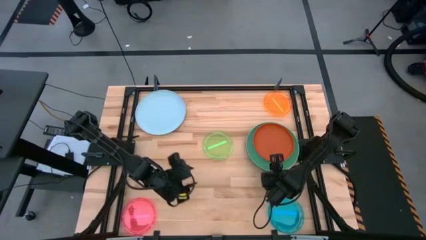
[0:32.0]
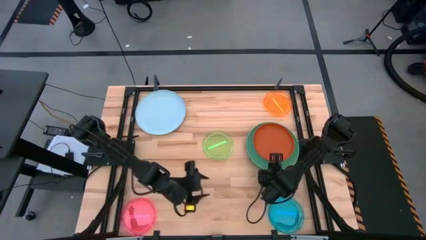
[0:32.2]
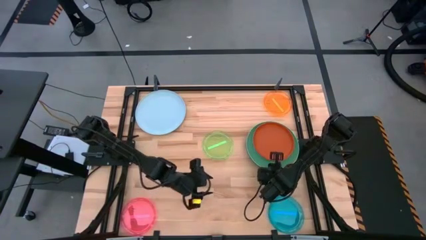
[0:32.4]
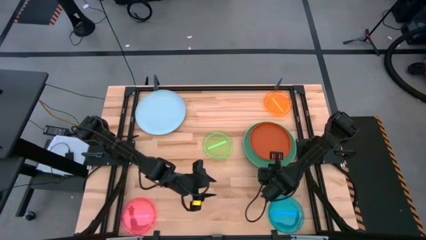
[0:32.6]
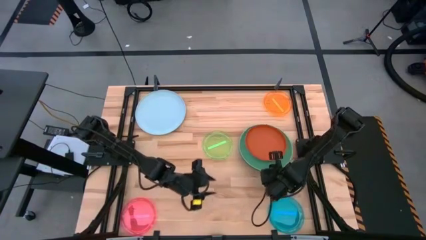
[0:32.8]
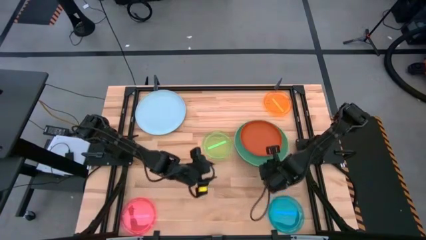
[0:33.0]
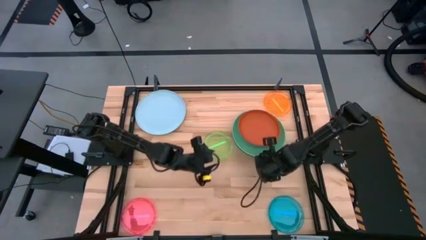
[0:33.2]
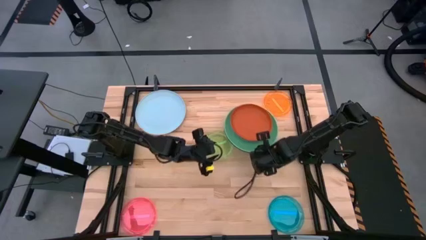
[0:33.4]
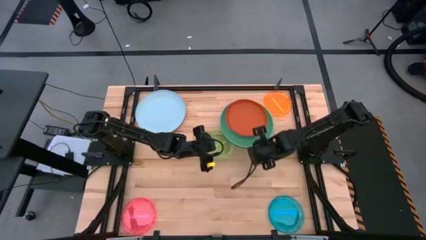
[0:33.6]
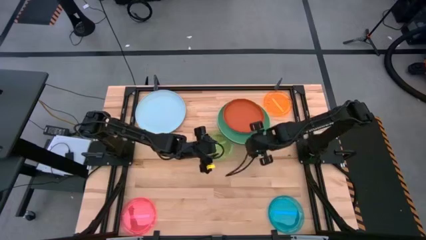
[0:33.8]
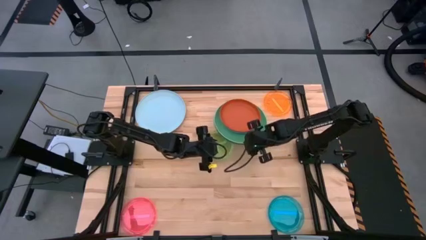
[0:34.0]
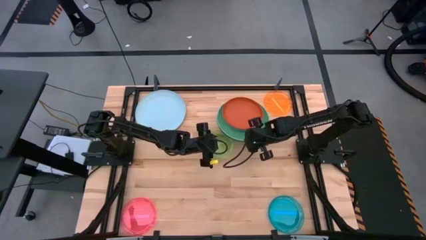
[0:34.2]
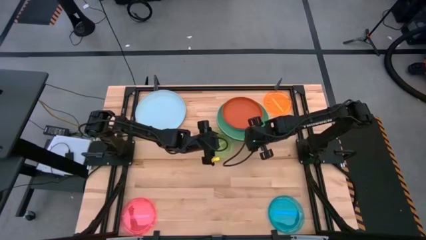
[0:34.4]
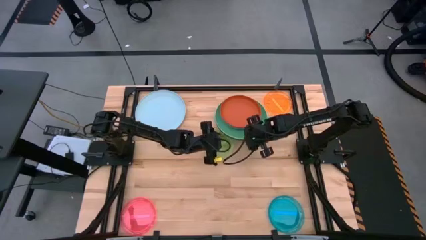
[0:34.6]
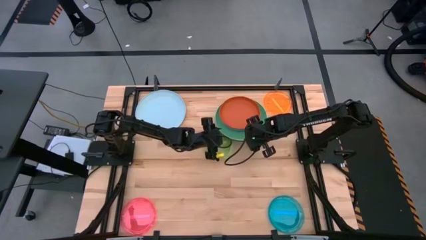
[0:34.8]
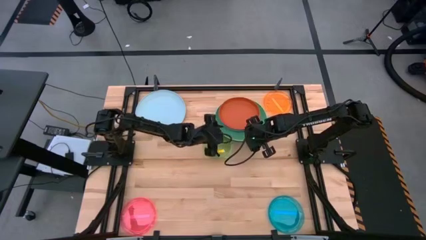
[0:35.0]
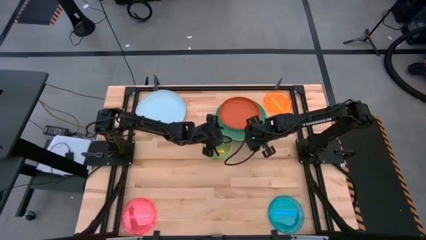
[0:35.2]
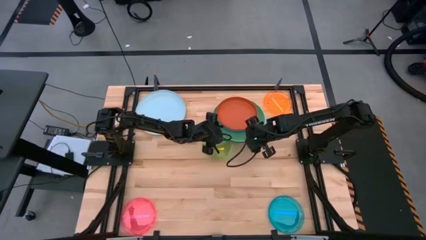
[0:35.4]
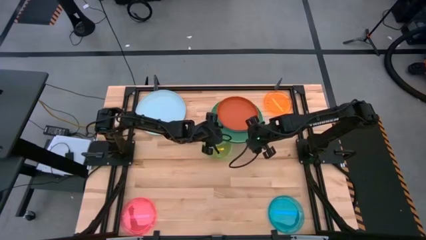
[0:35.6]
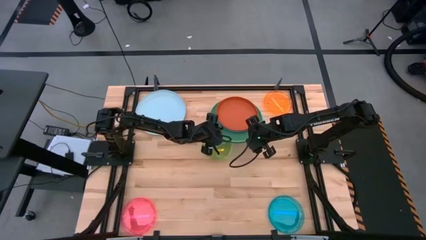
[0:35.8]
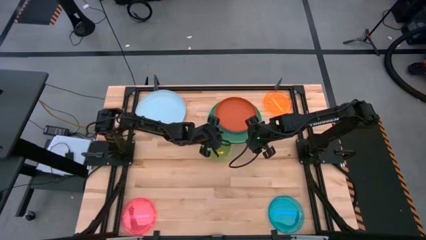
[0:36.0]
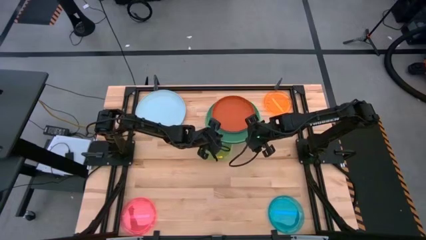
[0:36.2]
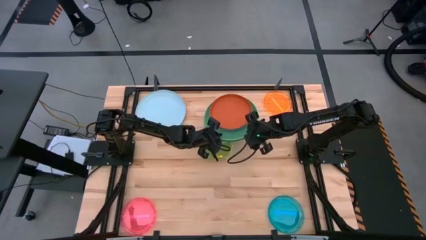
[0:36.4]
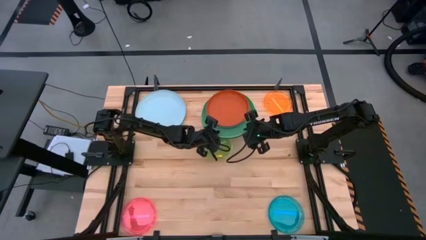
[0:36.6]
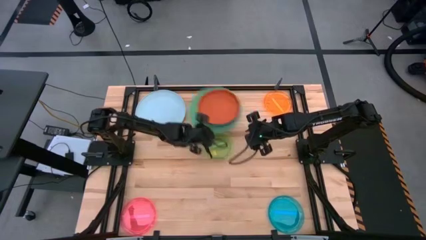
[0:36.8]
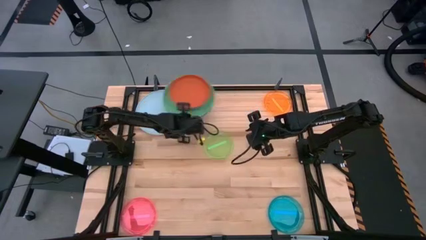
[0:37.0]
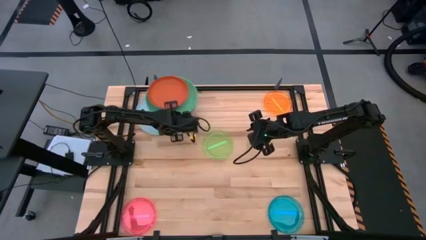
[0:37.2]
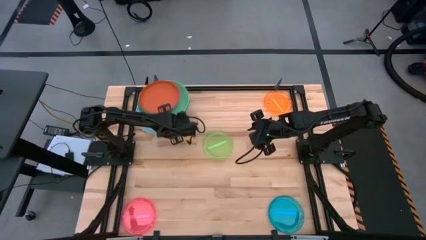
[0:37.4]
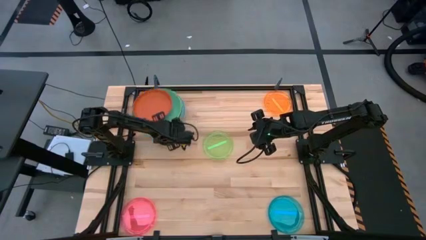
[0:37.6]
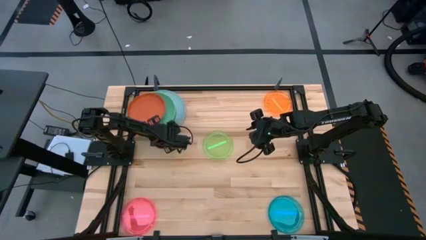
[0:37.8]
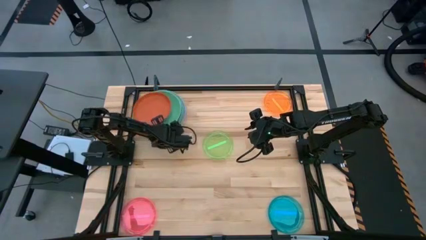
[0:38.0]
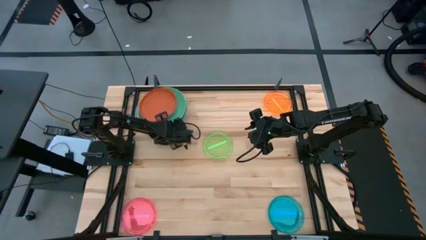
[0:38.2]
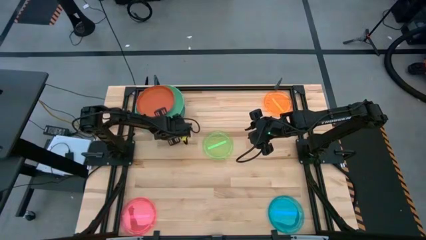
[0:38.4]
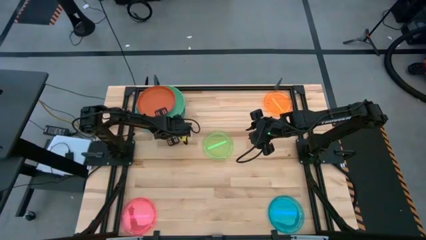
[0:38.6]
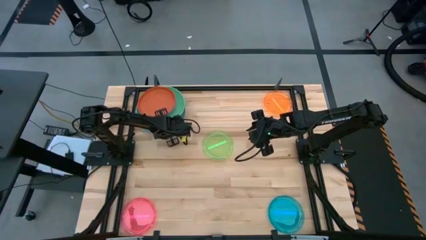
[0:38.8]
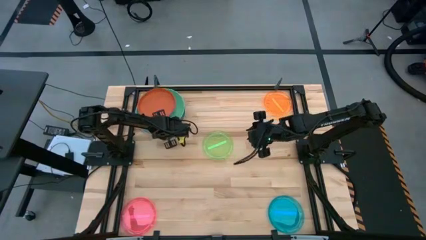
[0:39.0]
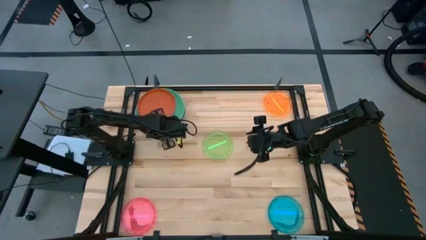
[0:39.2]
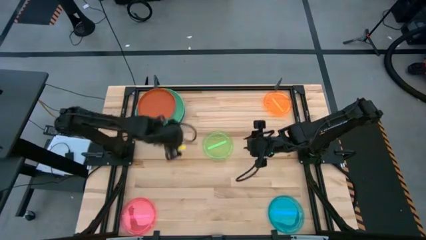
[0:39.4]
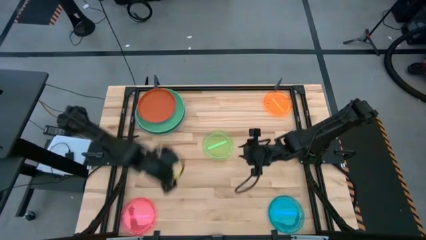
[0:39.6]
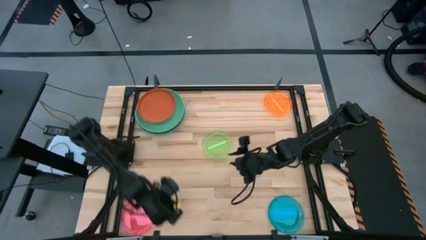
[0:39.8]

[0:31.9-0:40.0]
Task: Stack plastic plates
Stack the large pile of plates on the large sky blue plate

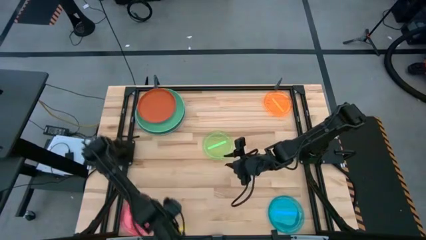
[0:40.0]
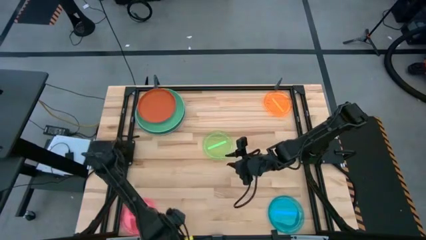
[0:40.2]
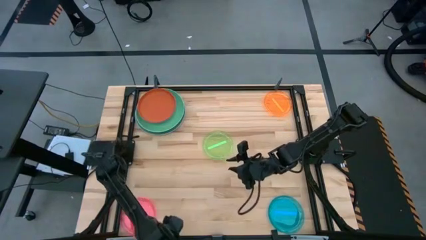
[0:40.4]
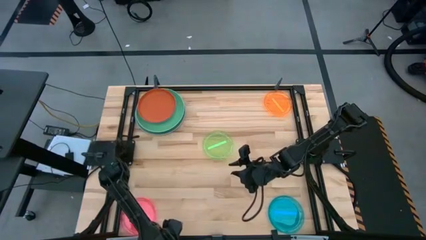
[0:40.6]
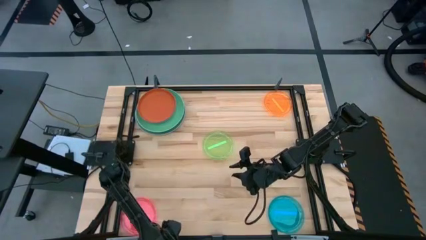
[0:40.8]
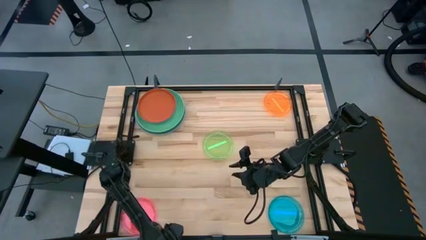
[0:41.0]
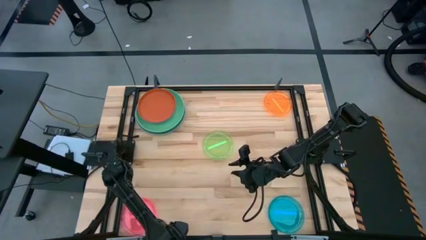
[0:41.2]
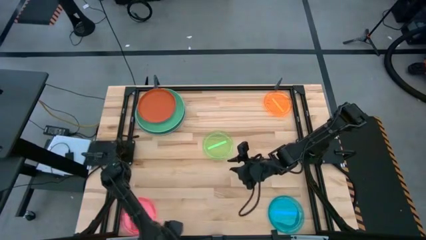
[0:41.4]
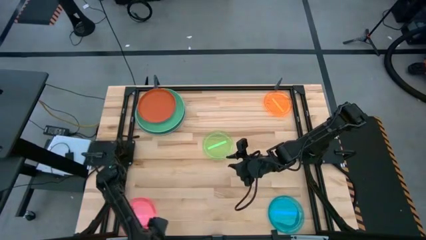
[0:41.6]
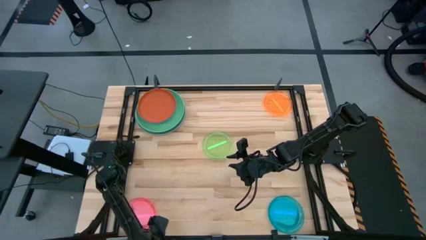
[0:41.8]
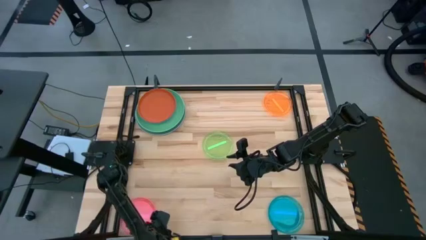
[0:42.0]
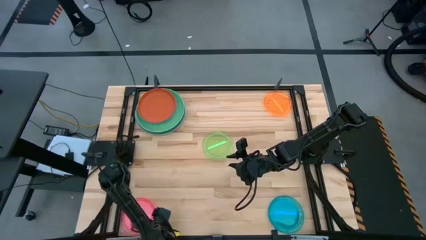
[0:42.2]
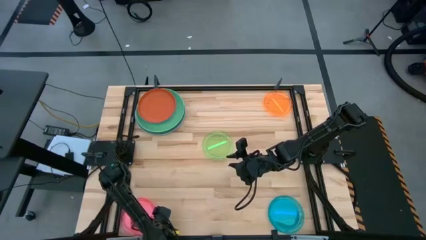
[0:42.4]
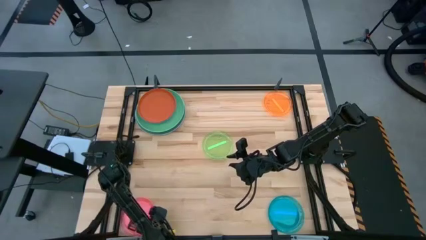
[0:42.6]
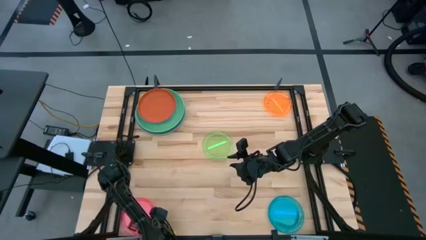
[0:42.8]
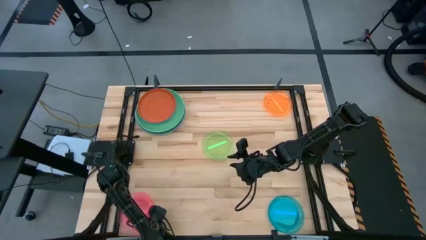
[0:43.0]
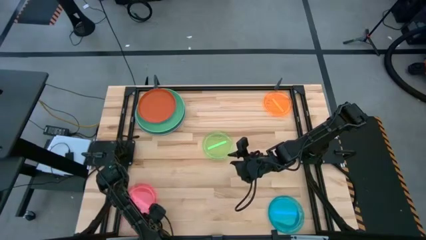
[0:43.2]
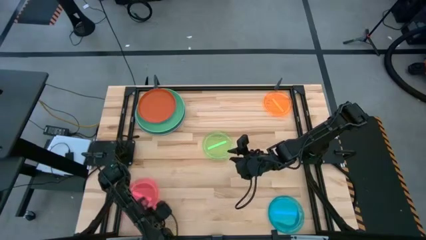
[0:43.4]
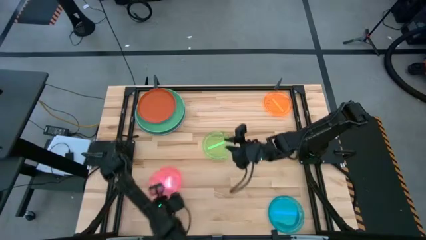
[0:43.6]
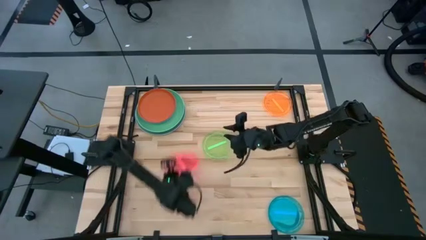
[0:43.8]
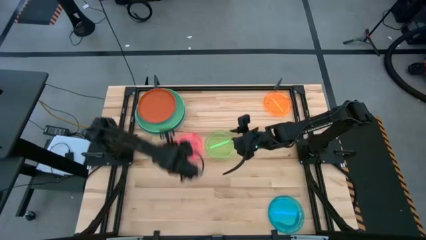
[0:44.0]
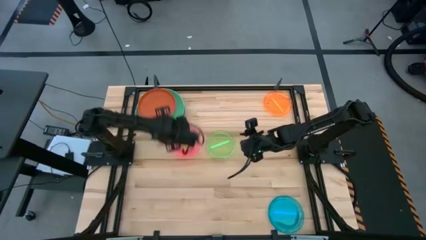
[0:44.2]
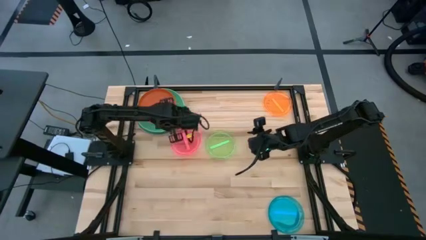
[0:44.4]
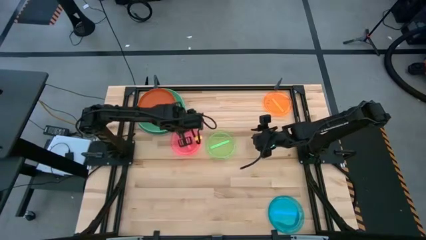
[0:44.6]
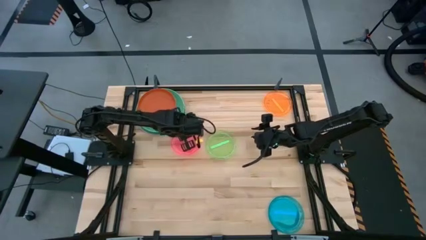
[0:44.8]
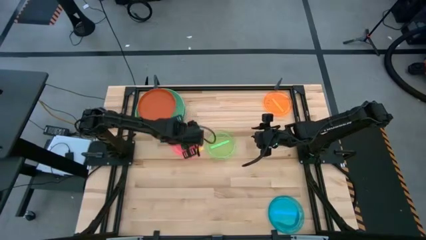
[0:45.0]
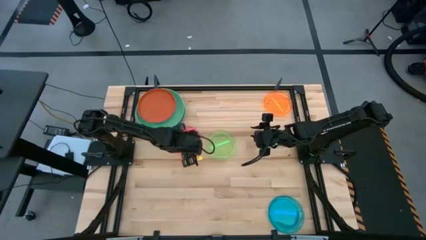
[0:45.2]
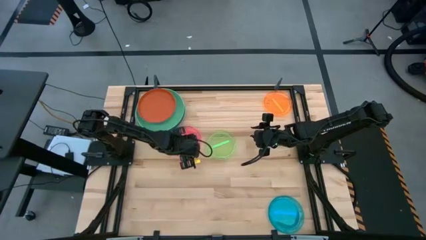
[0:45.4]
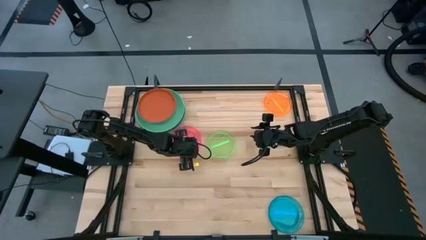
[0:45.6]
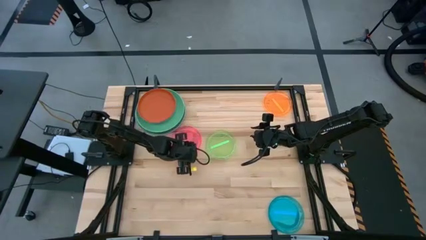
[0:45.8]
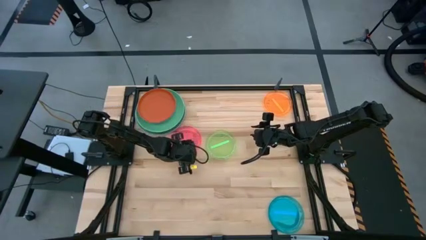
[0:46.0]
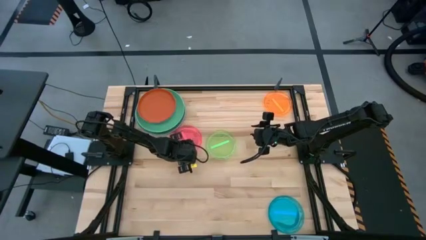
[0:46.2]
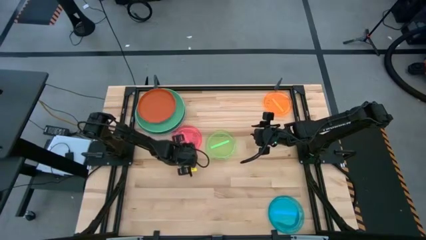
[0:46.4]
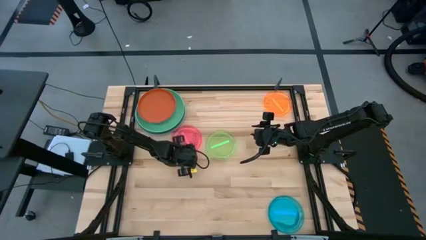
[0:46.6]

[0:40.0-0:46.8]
Stack the small red plate on the small green plate

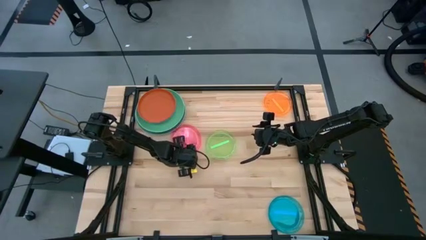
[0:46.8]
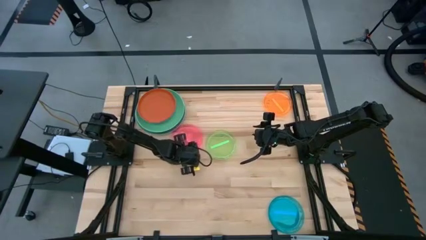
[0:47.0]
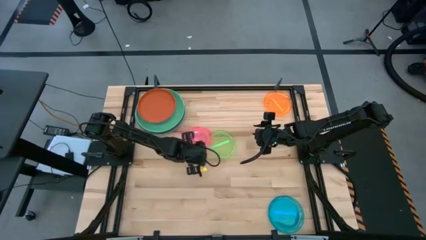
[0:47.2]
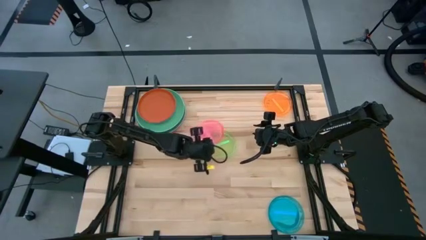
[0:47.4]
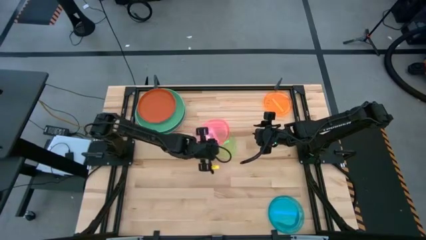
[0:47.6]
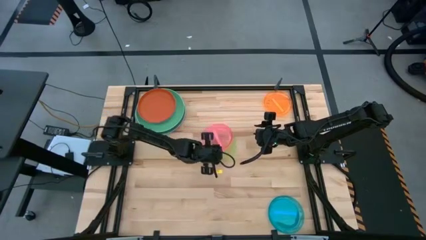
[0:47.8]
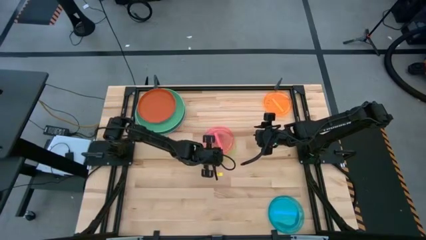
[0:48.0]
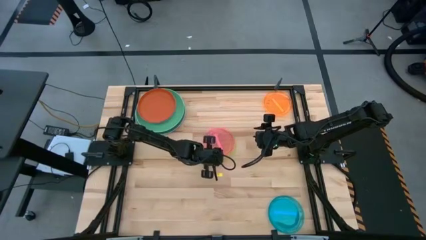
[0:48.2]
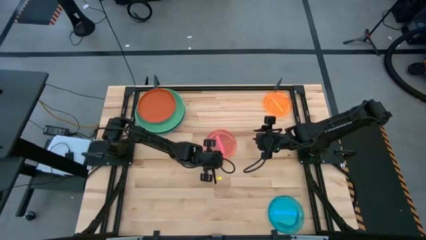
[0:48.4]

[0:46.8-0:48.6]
Stack the small red plate on the small green plate
